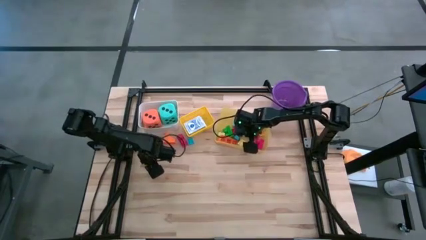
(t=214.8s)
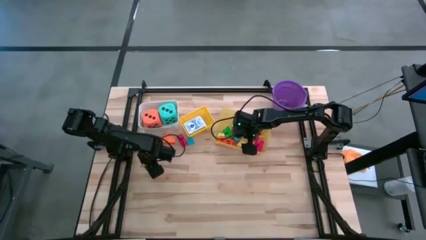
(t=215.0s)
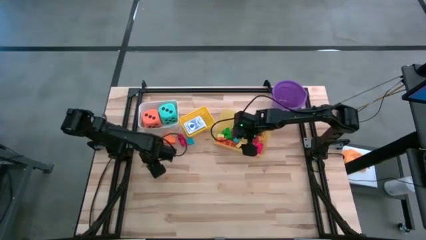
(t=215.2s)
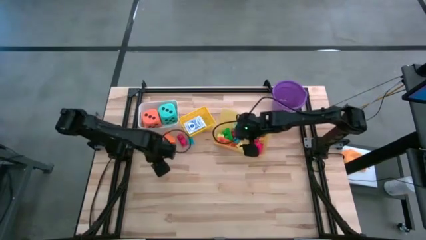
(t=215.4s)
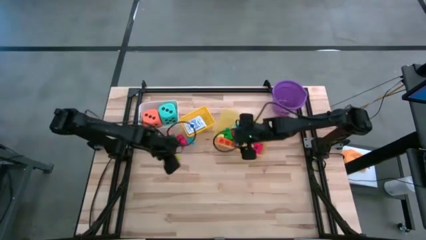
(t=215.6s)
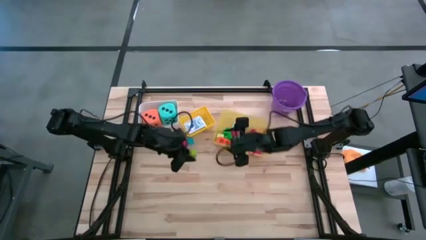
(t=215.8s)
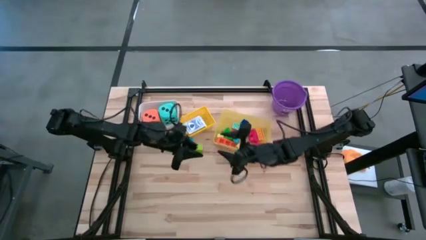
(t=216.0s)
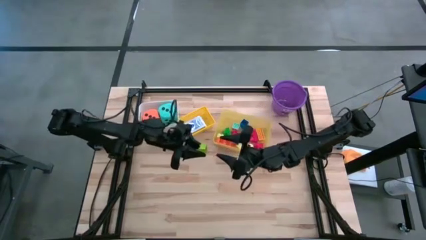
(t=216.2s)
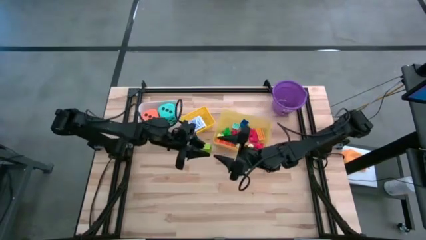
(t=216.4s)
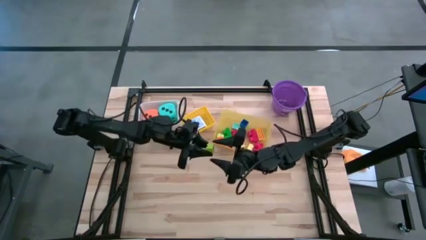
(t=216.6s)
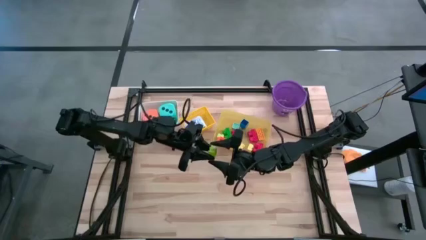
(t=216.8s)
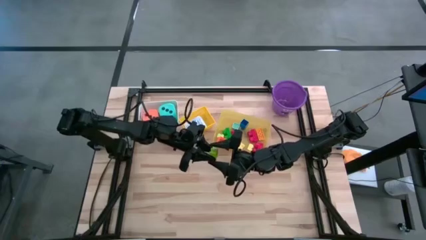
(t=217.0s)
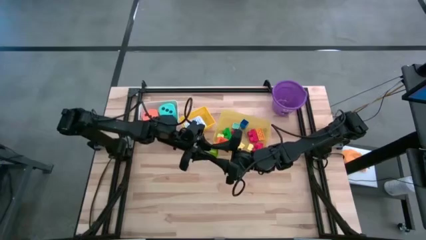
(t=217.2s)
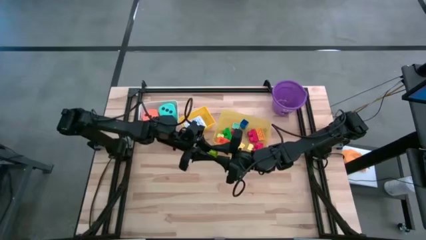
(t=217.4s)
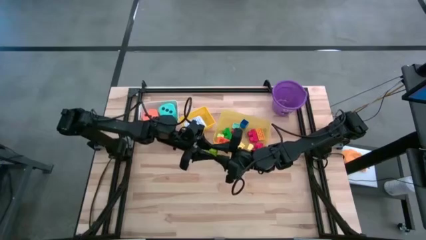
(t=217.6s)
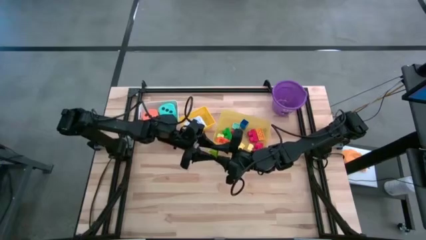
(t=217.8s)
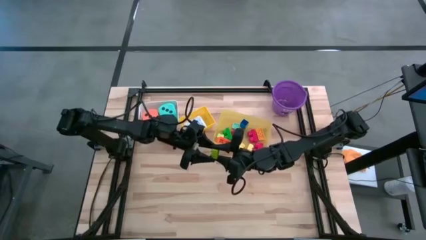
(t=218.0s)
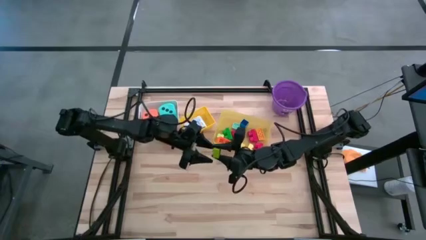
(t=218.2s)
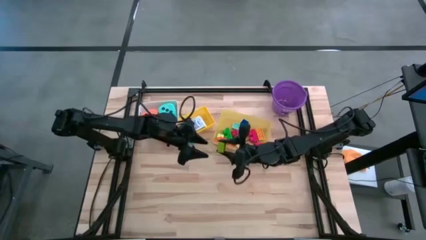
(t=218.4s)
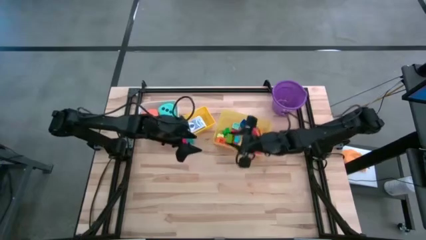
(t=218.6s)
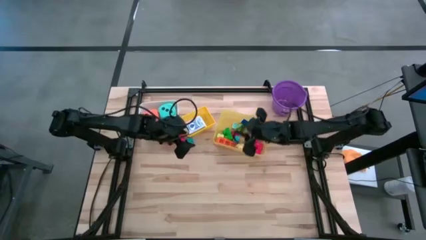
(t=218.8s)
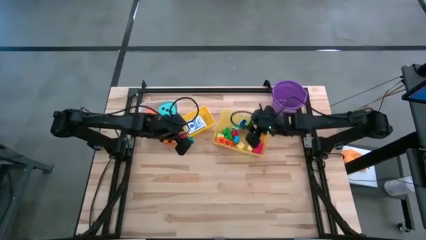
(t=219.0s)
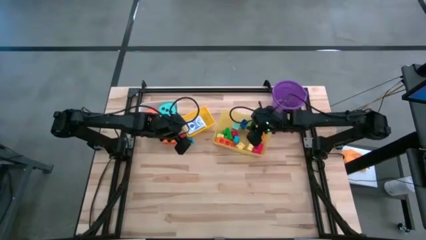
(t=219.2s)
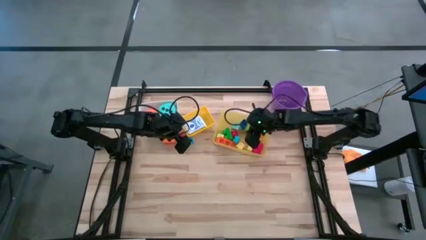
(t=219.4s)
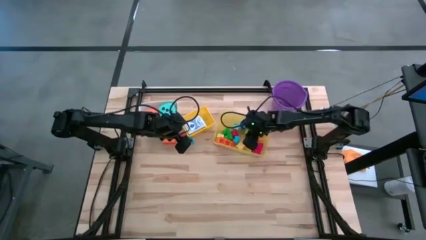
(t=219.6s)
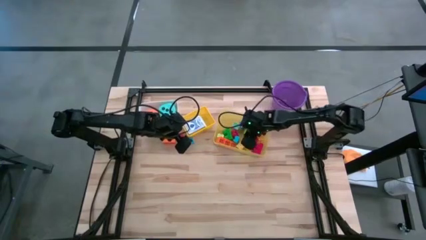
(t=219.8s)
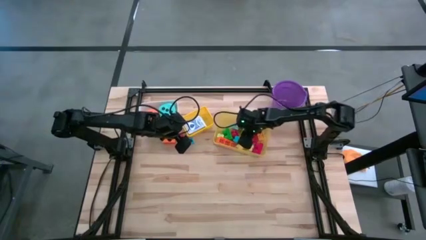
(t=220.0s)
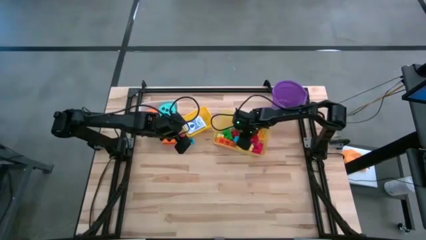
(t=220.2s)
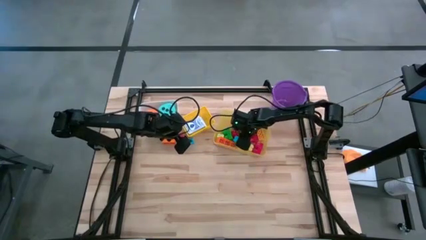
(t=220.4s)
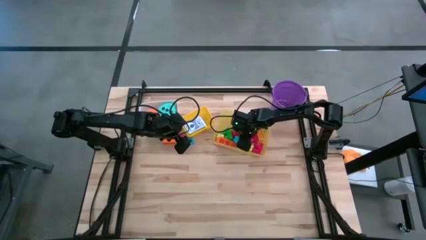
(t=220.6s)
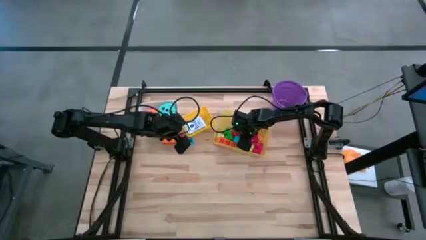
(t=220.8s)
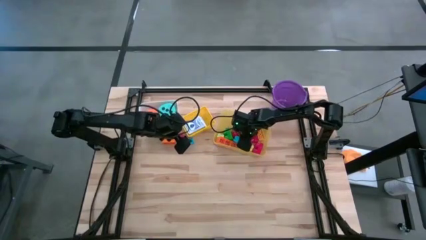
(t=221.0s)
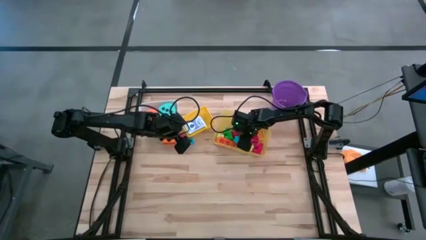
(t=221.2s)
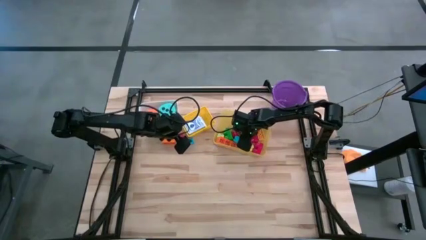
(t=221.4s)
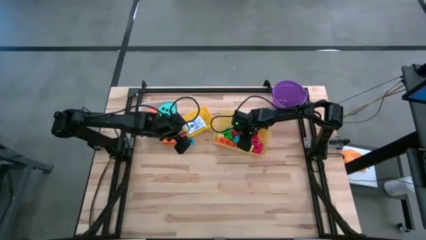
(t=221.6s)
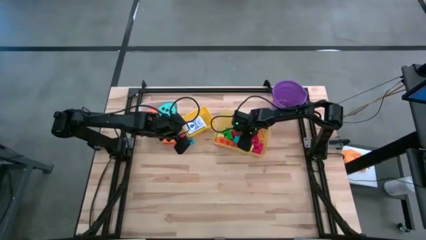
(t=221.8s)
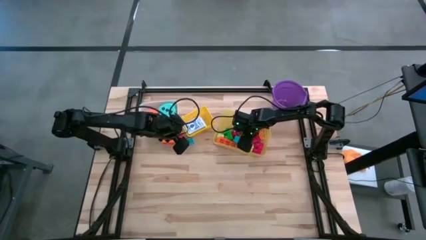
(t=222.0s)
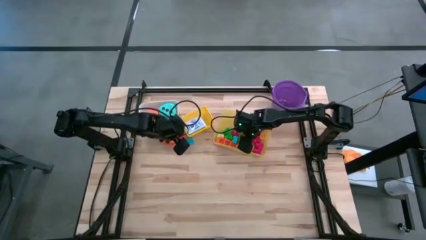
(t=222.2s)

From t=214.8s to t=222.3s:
Task: Pick & Place Toys
Put the green game piece into the yellow bin

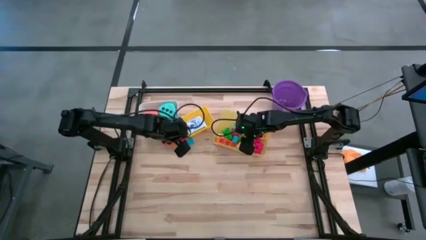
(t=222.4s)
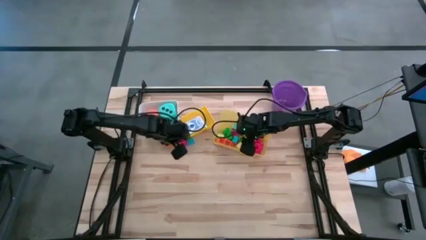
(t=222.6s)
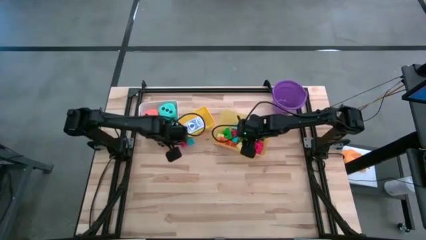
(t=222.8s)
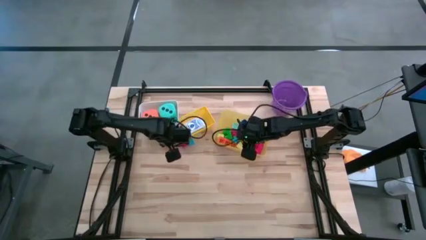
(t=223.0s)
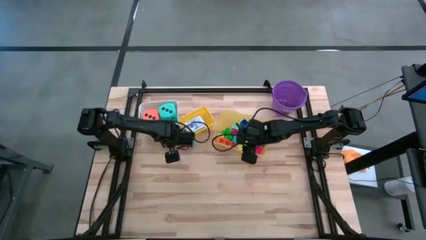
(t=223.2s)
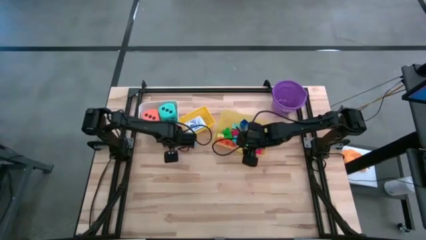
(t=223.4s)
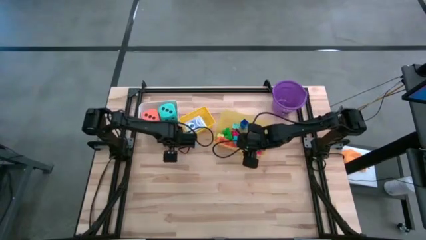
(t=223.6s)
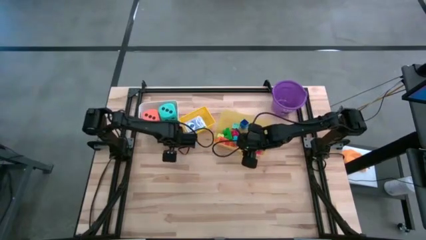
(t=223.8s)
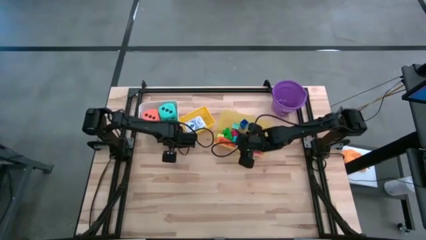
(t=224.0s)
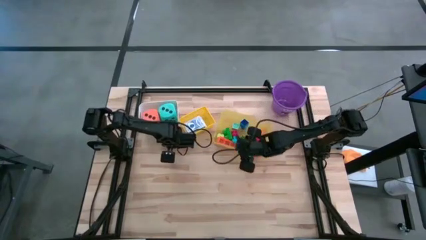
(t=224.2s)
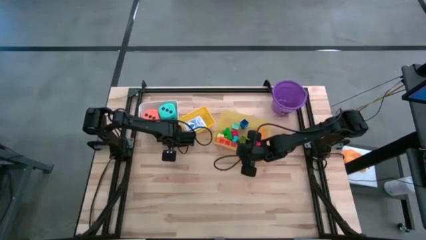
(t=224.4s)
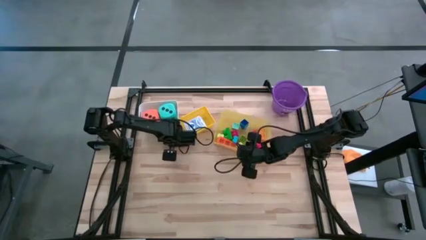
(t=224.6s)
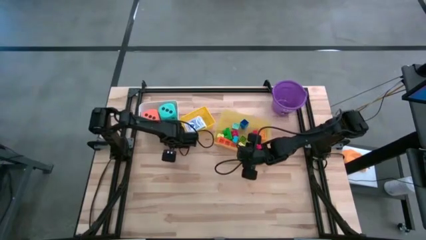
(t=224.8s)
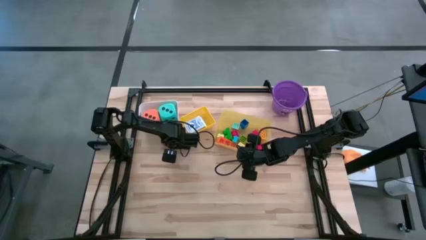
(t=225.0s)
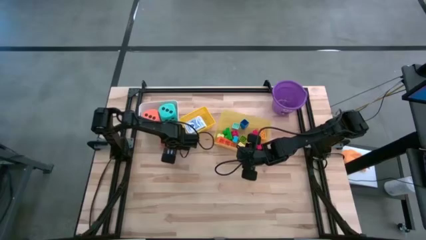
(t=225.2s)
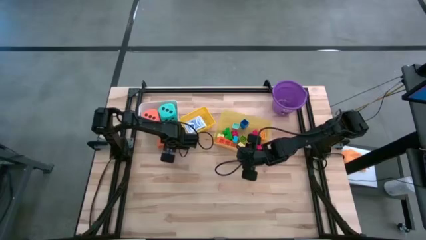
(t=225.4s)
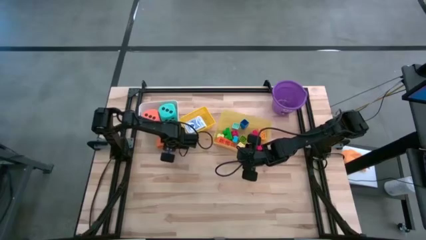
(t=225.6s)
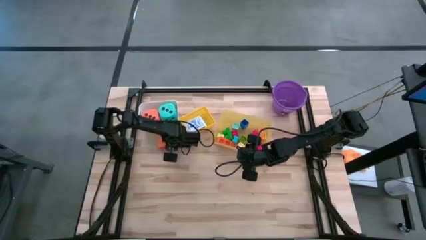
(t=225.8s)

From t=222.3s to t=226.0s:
Put the orange game piece into the yellow bin

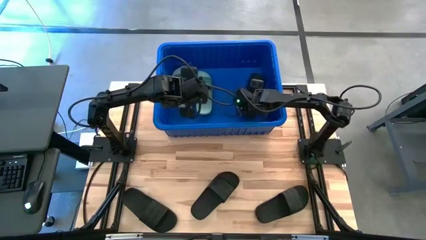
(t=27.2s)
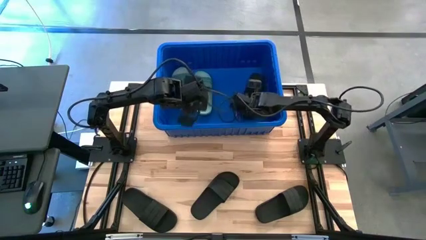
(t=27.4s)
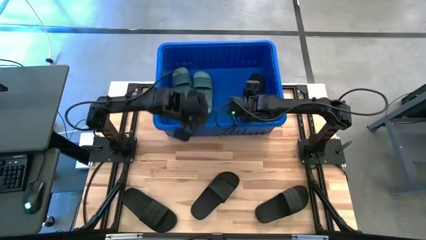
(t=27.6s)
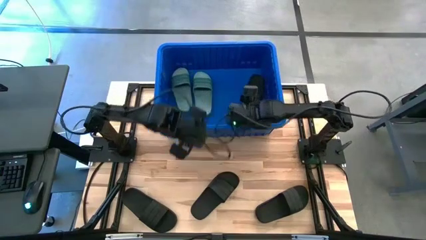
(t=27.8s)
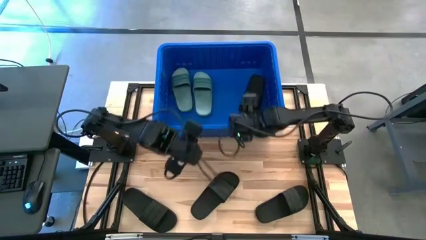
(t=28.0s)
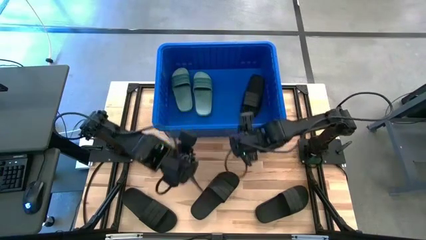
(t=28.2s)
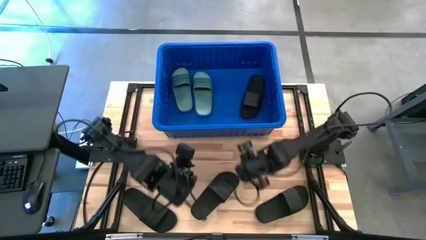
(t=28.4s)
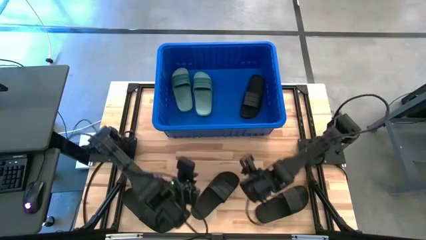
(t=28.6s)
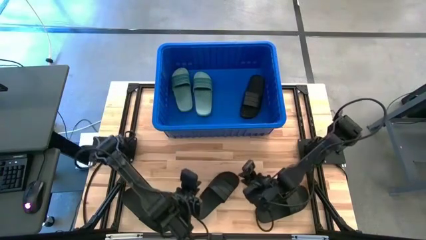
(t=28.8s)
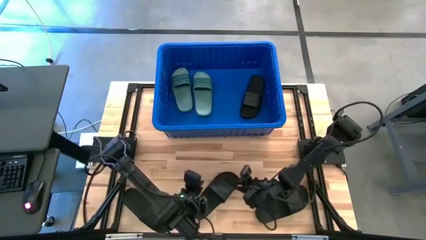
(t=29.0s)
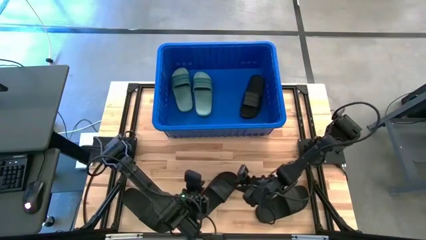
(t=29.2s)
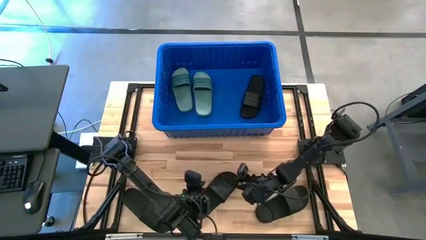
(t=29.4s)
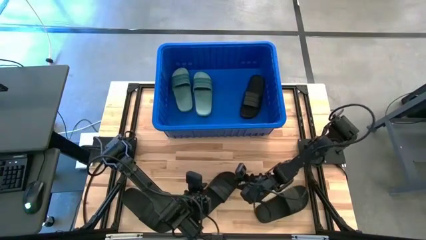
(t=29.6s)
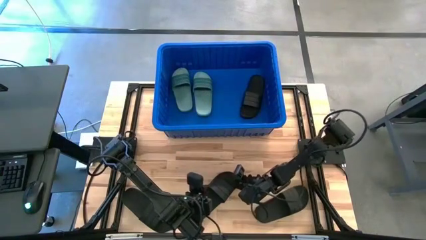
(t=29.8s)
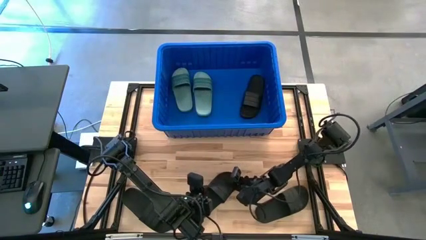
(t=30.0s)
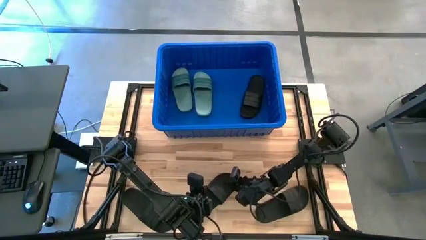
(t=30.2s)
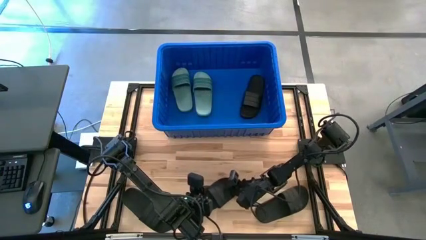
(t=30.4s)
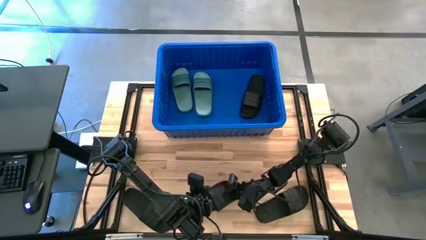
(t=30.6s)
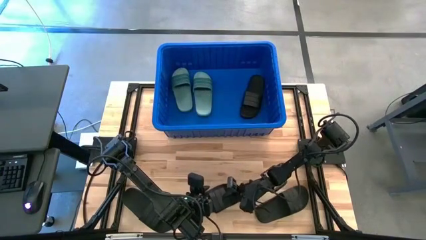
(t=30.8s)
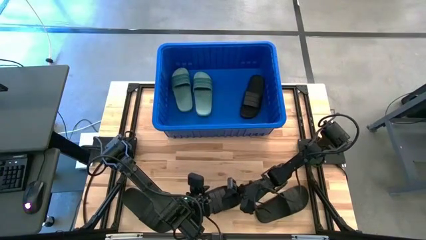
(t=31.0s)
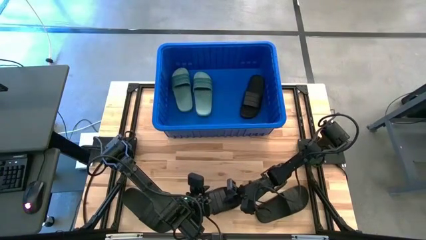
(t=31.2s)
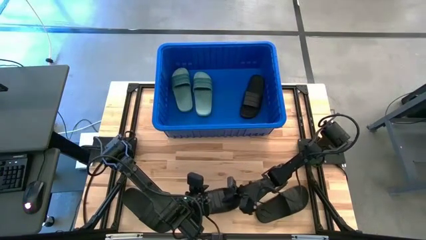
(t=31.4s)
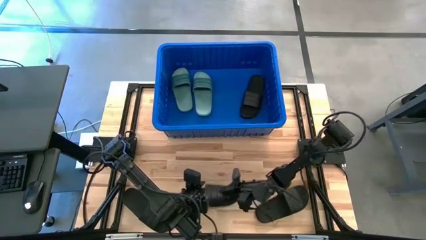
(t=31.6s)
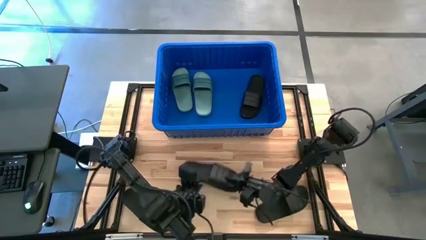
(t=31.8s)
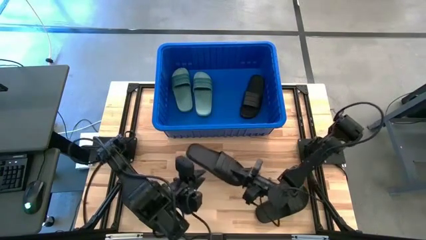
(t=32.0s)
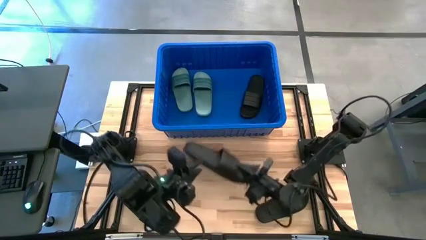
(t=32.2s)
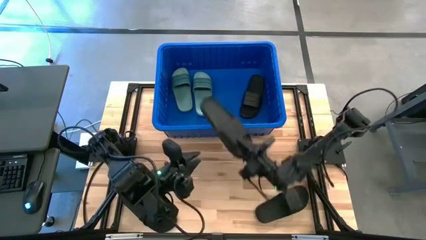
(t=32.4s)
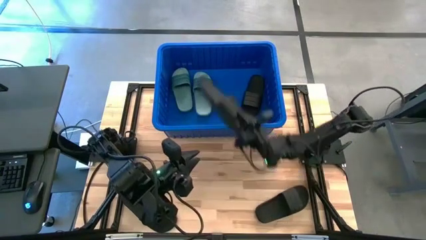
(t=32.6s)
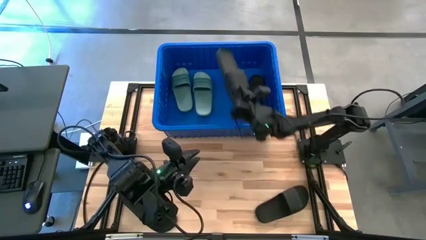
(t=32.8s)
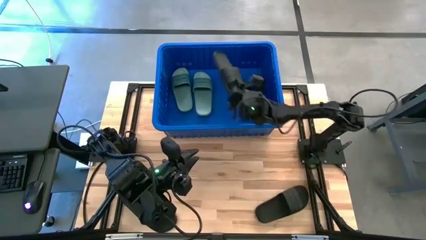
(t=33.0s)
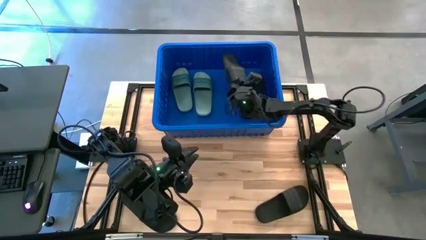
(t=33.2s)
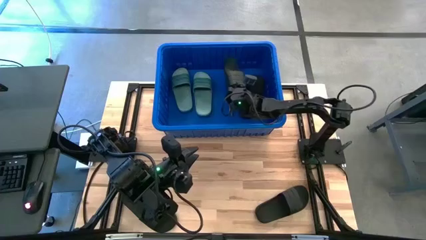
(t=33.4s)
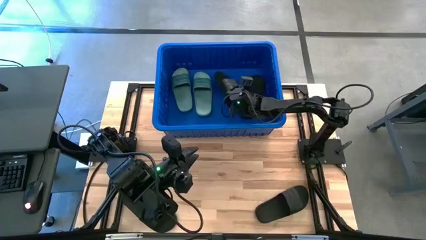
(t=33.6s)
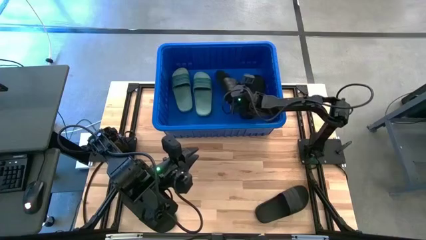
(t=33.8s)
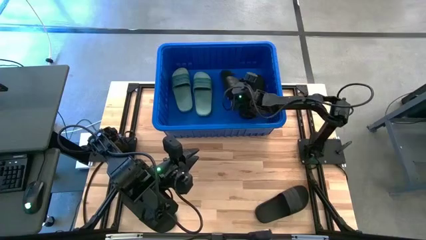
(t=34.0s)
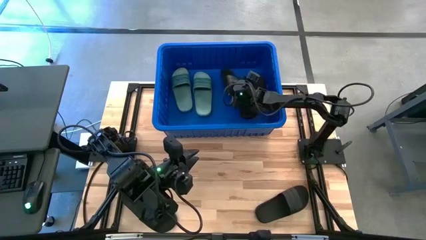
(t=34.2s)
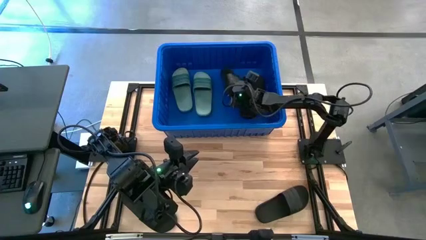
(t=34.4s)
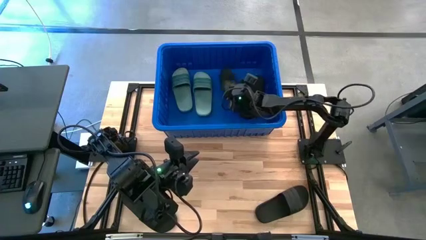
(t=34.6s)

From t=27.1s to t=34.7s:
Task: Pick and place slides into bin
Put the black slide into the blue bin
